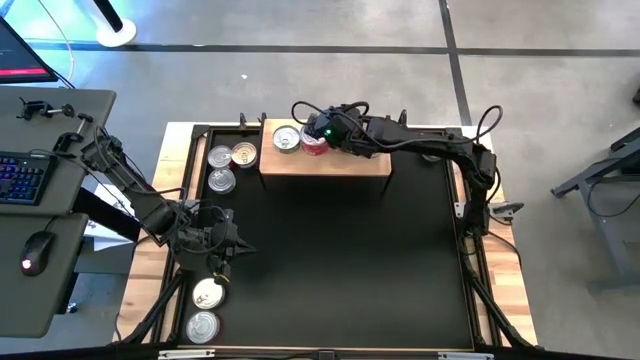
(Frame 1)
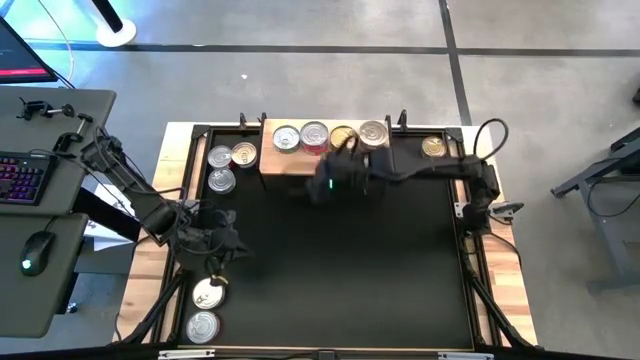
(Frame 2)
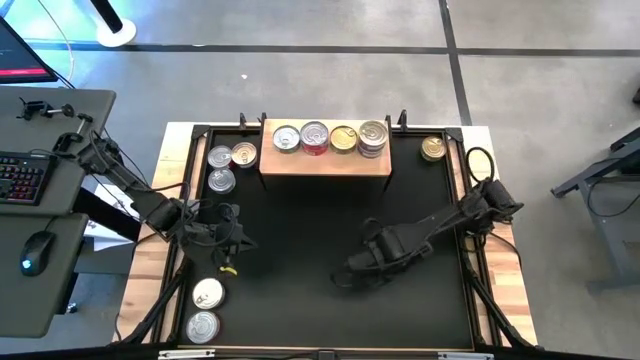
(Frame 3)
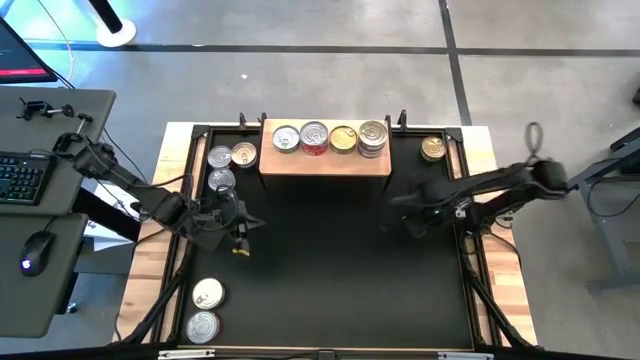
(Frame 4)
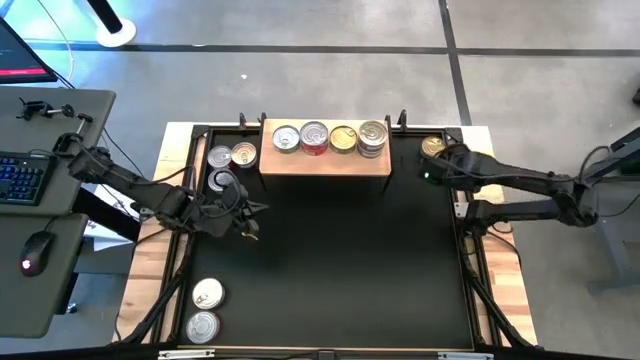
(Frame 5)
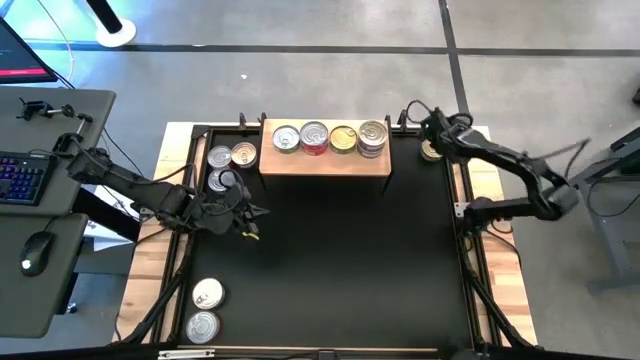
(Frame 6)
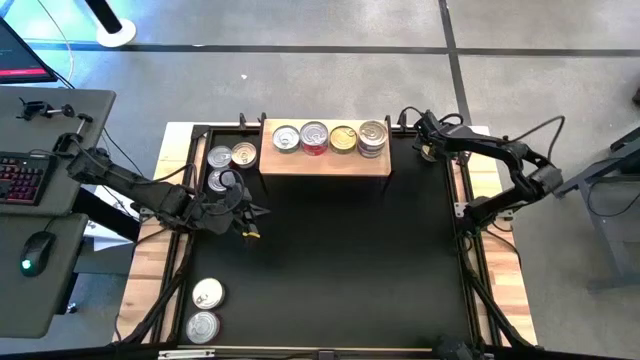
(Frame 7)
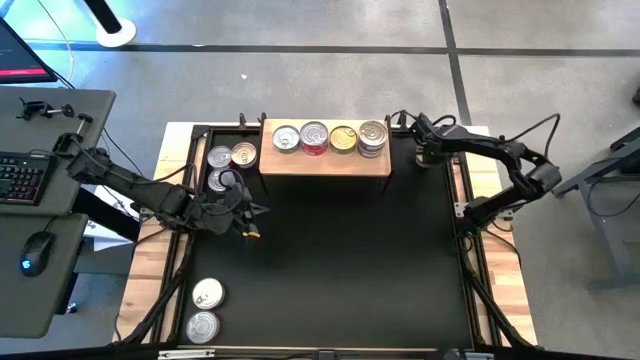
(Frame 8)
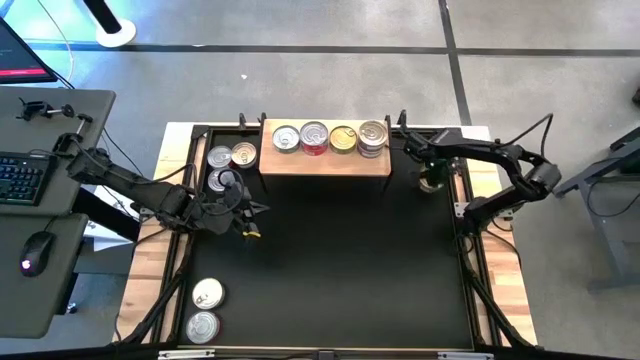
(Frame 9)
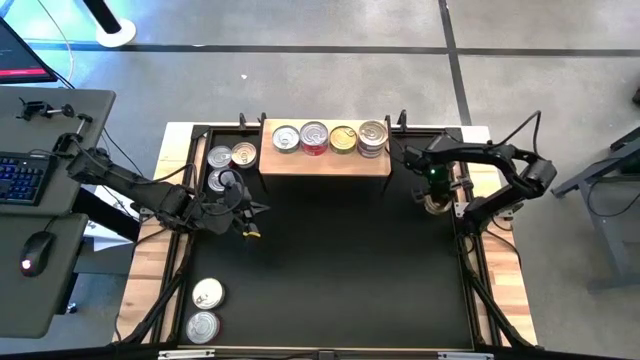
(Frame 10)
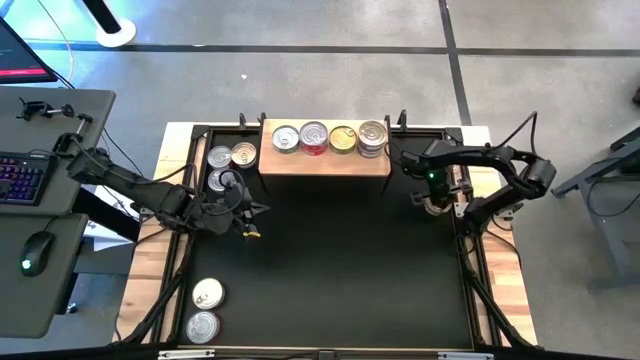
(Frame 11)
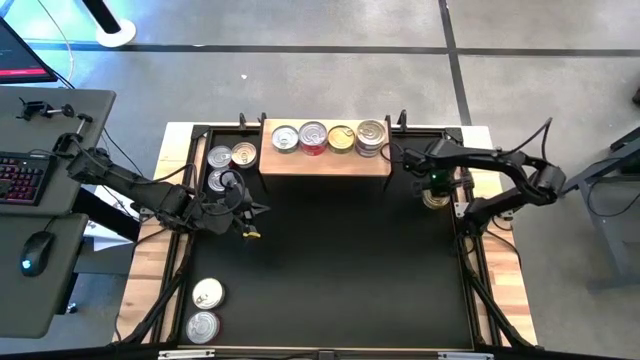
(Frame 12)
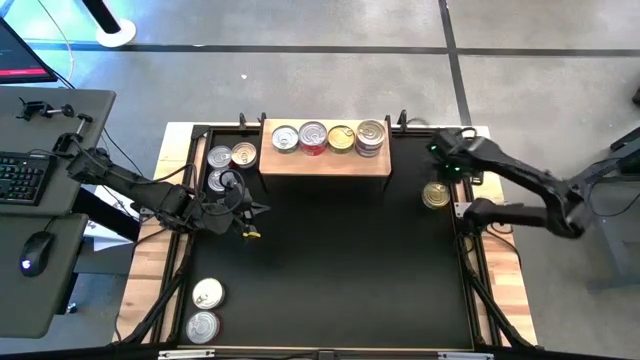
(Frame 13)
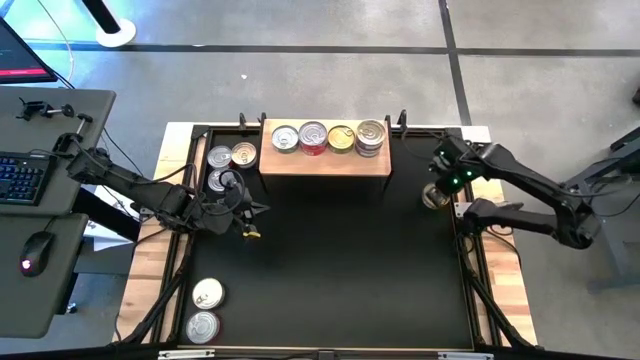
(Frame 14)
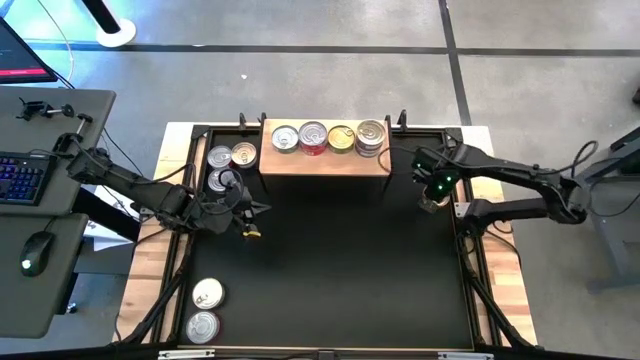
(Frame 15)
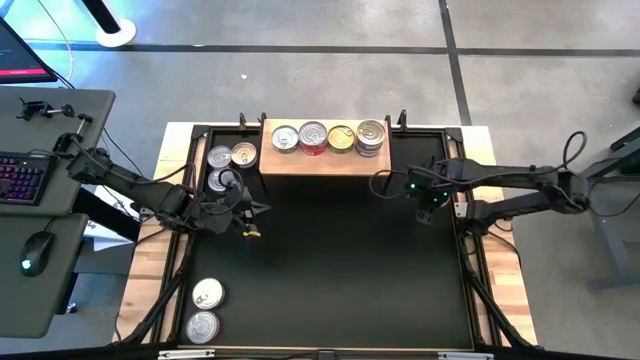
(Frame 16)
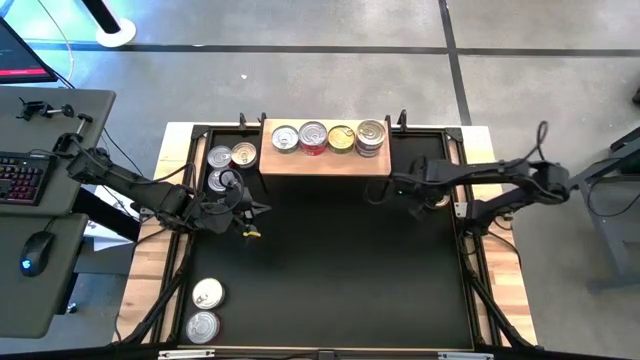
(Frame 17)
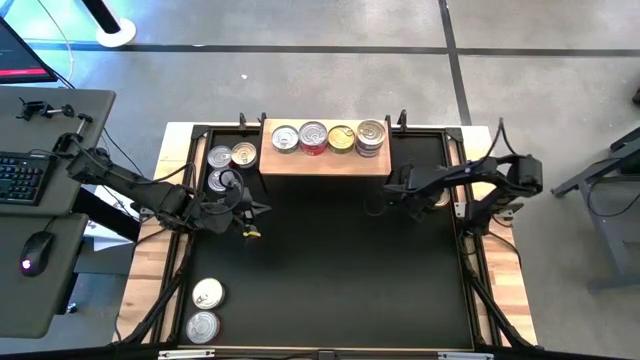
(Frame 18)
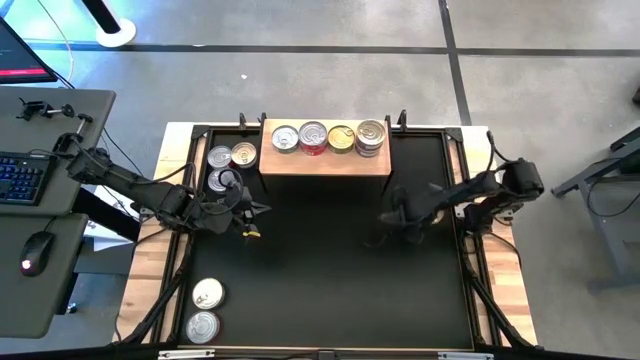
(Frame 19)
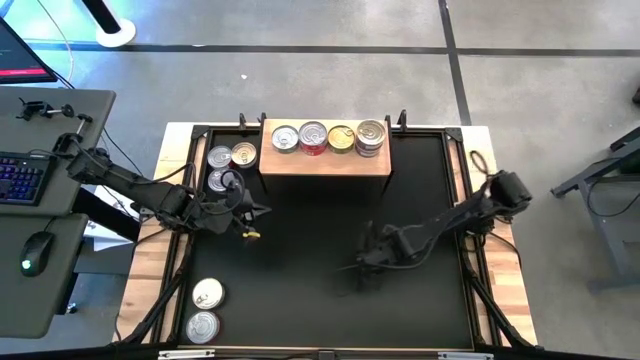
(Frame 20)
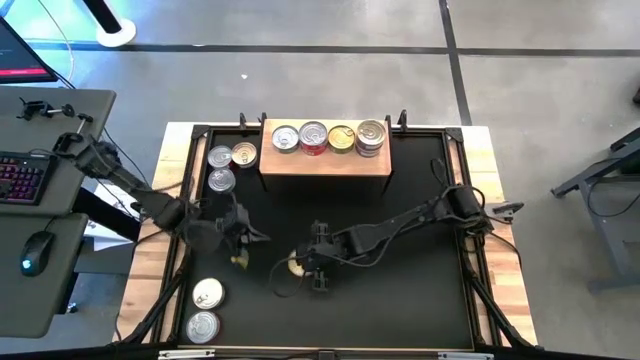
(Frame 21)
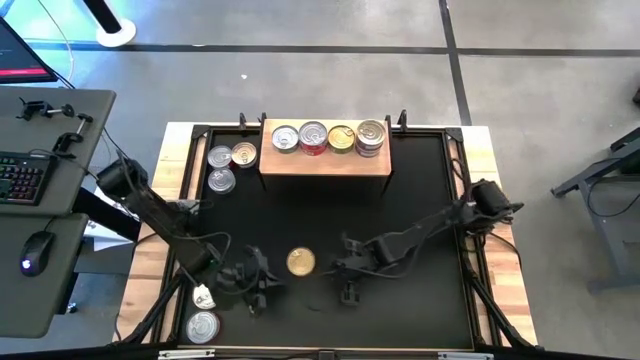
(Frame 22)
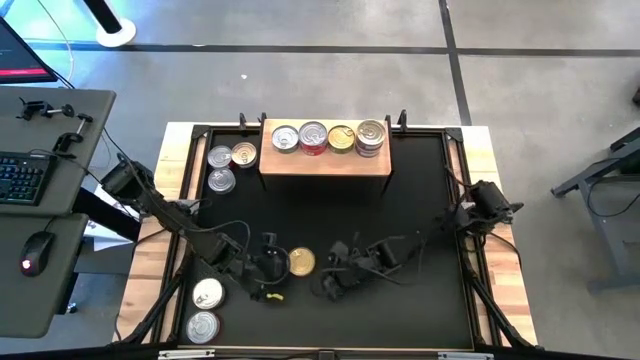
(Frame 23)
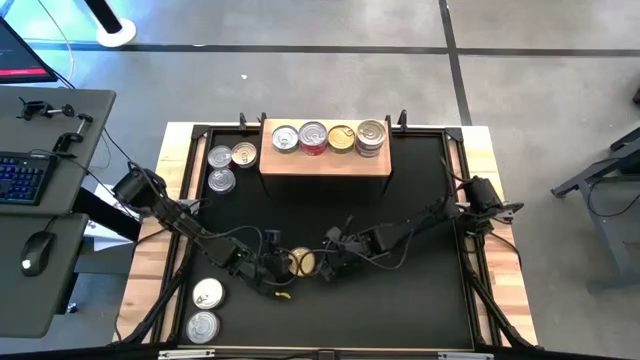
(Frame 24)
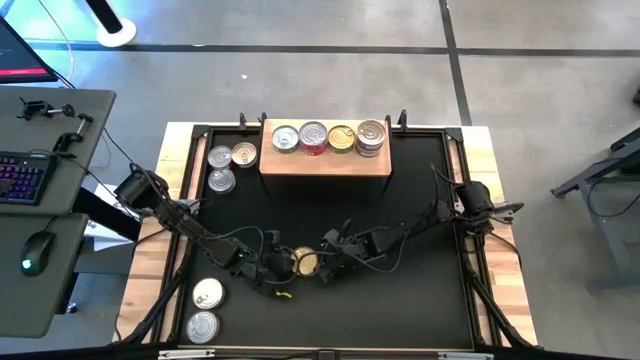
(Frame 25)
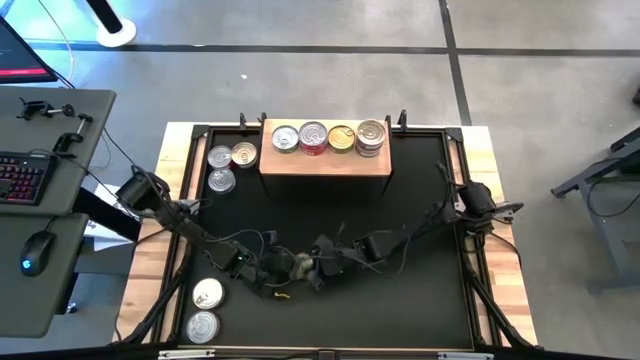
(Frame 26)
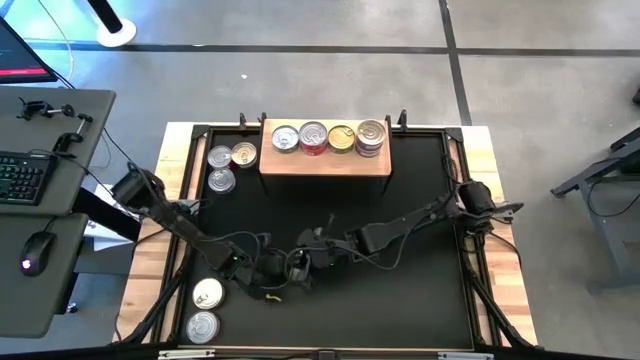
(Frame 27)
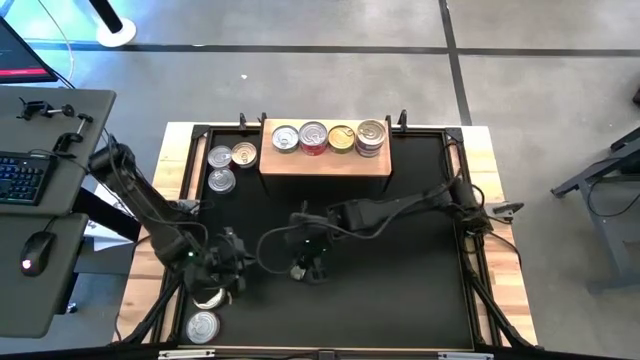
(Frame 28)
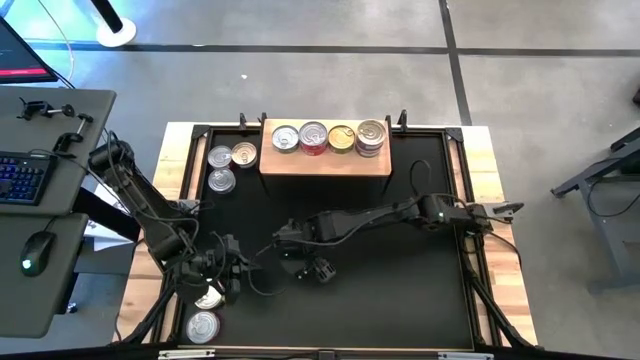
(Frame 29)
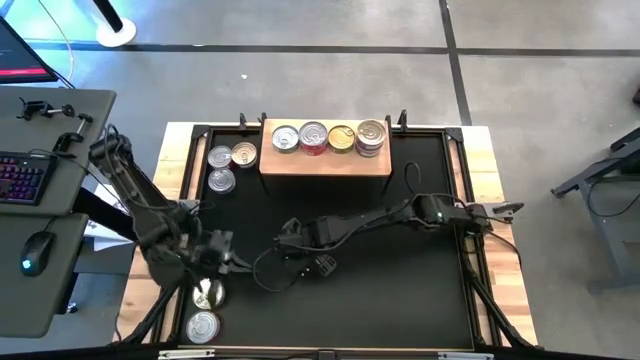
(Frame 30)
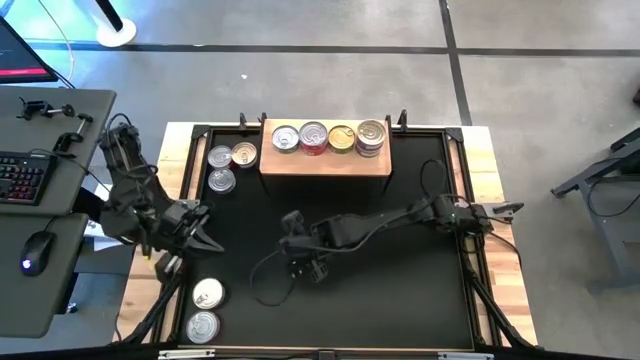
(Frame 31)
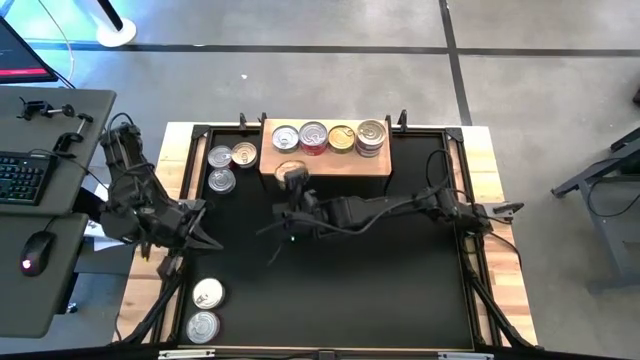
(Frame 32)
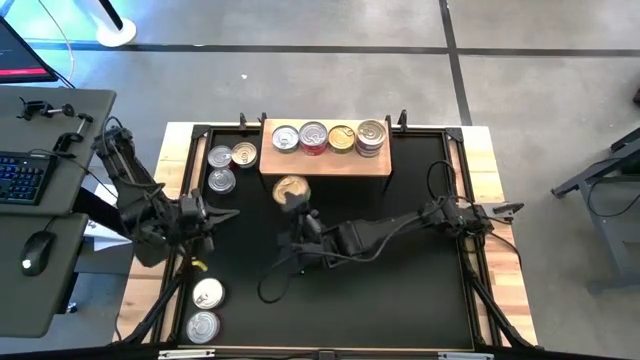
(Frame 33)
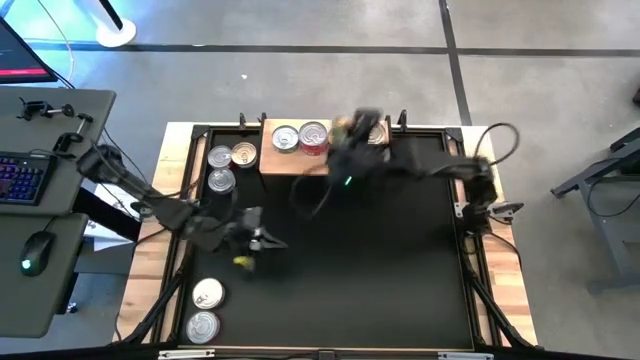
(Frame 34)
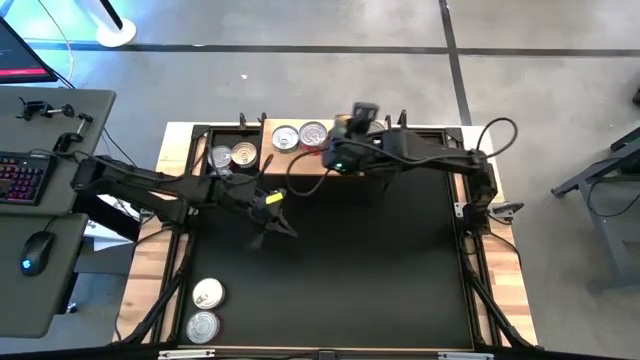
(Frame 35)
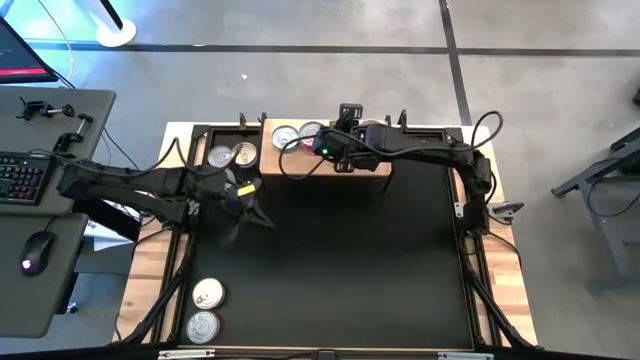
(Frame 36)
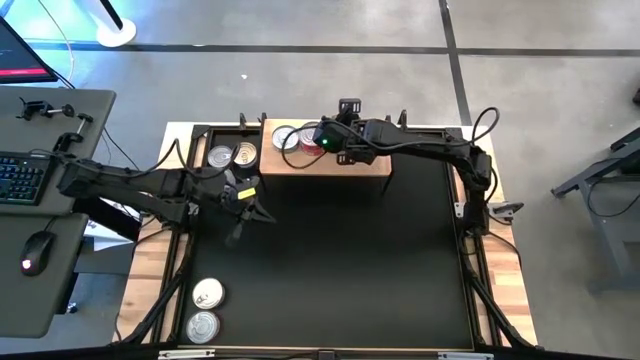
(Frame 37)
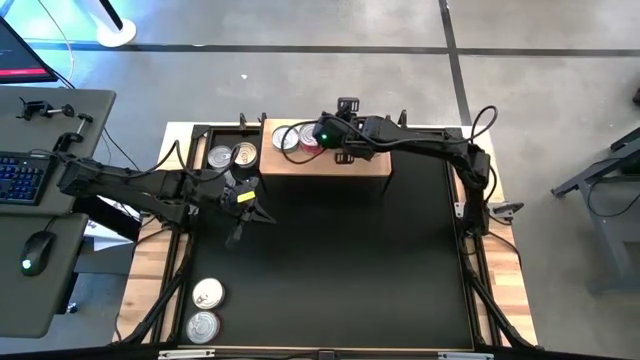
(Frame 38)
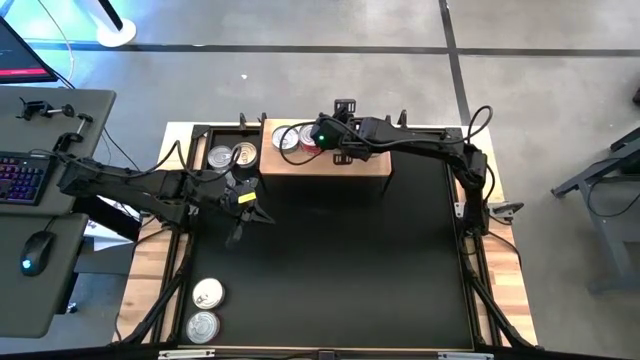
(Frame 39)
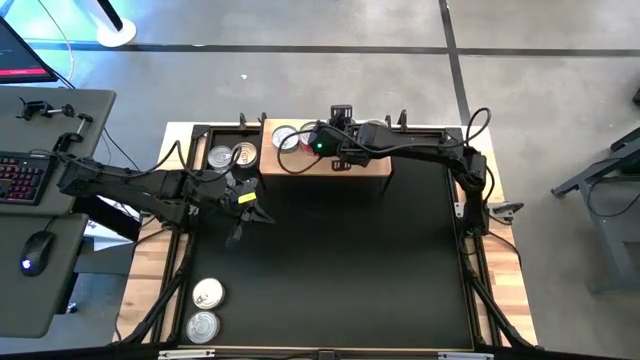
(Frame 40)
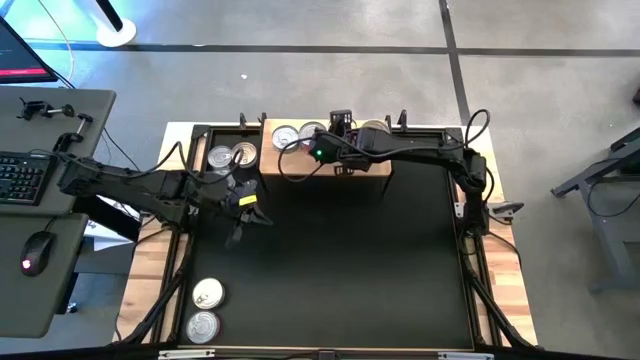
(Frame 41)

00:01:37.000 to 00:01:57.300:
Task: Stack canned seafood by type on shelf
Stack the green tuna can on top of the other green tuna can
